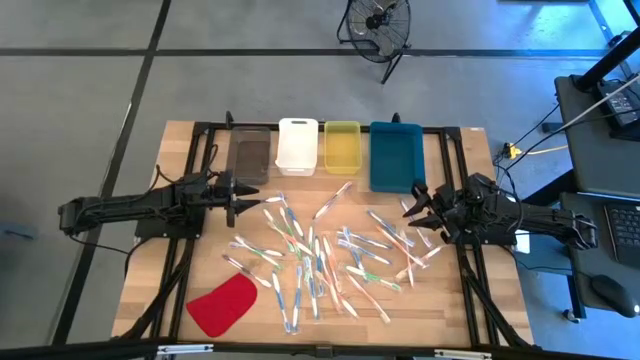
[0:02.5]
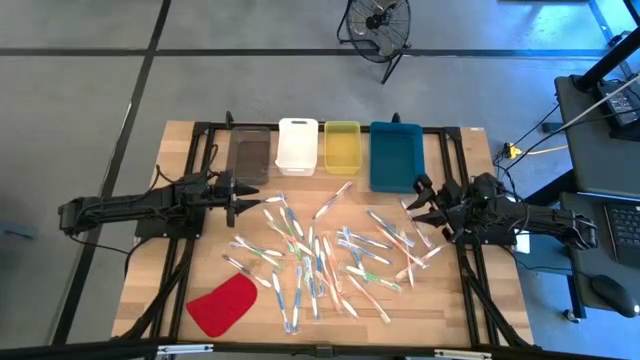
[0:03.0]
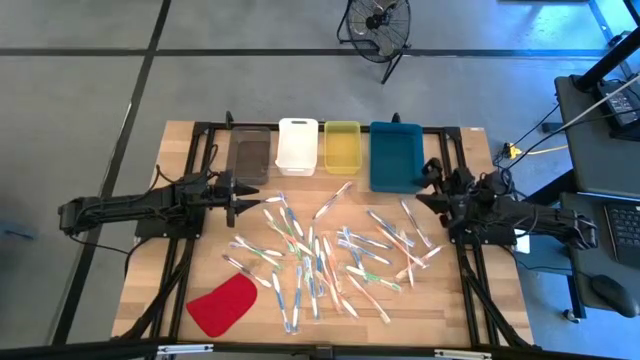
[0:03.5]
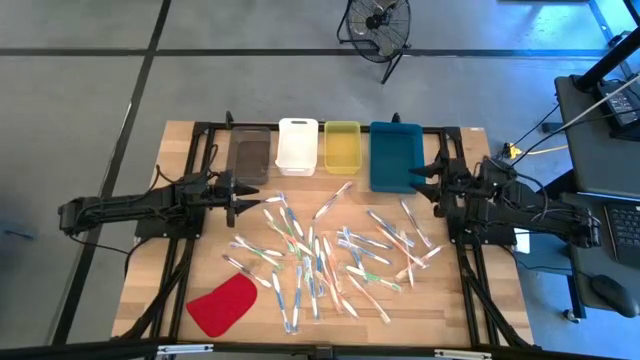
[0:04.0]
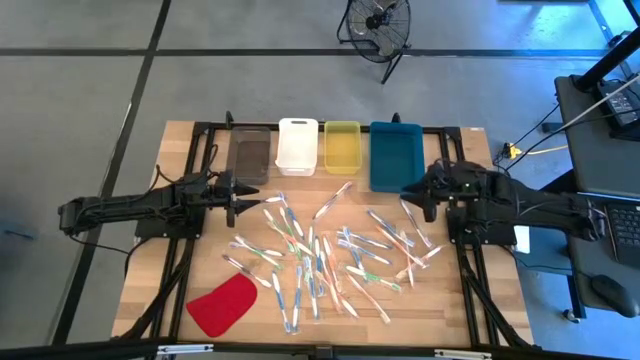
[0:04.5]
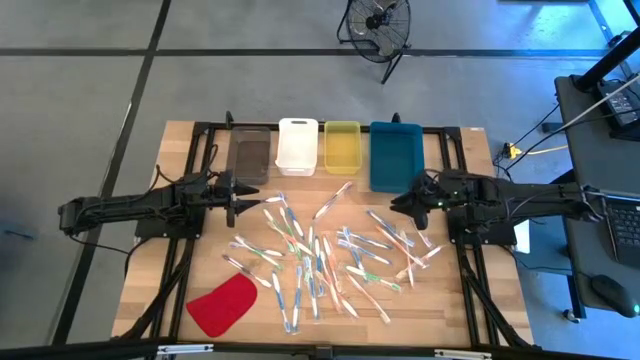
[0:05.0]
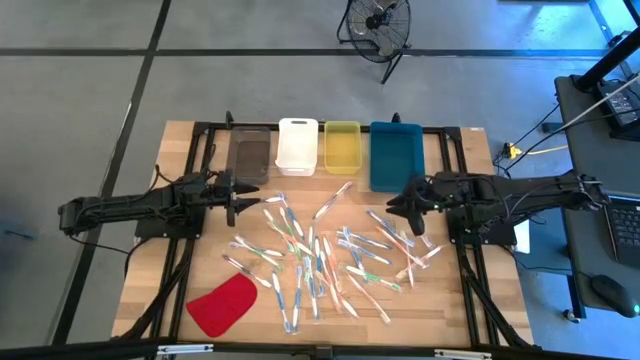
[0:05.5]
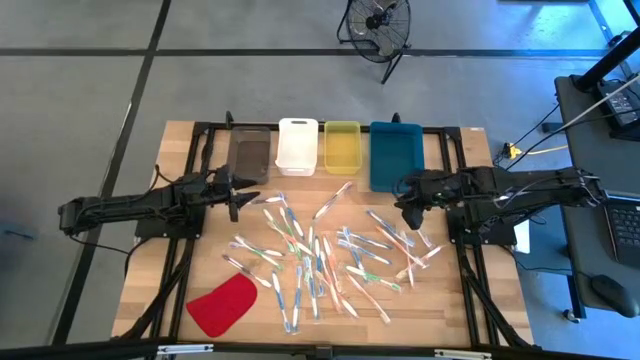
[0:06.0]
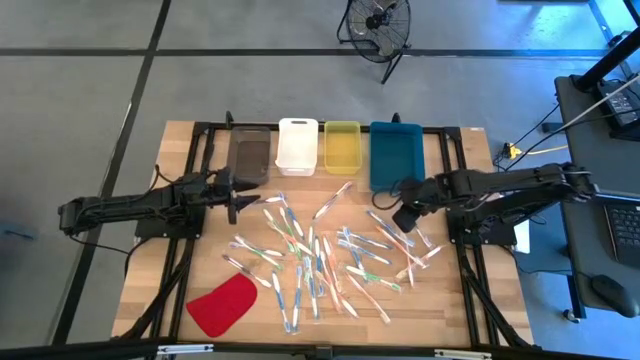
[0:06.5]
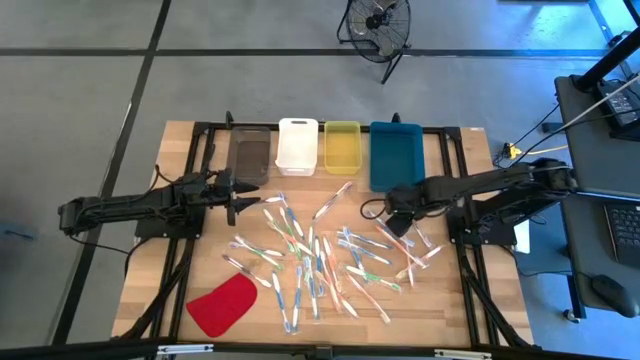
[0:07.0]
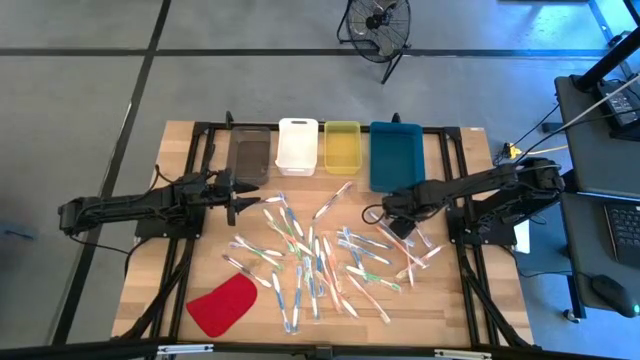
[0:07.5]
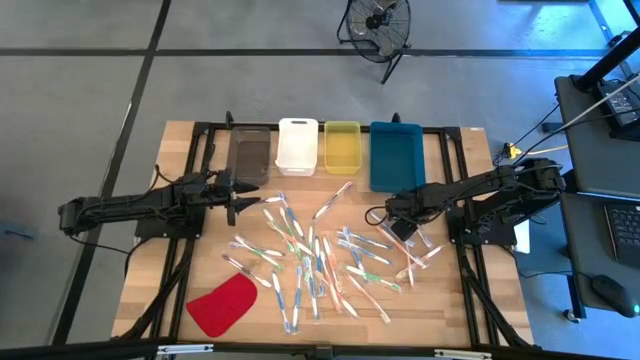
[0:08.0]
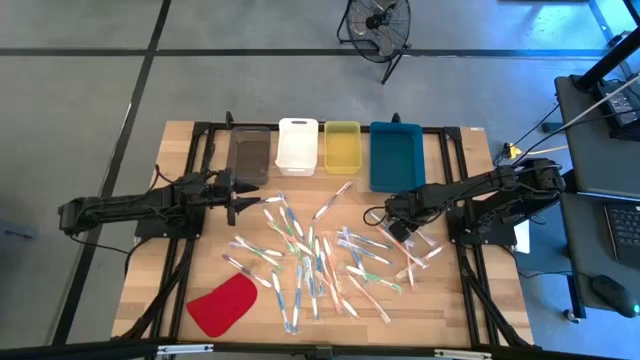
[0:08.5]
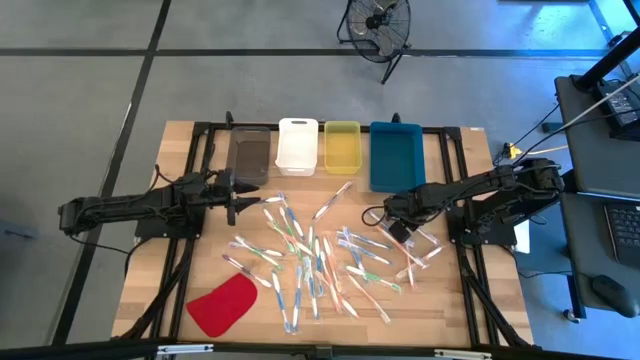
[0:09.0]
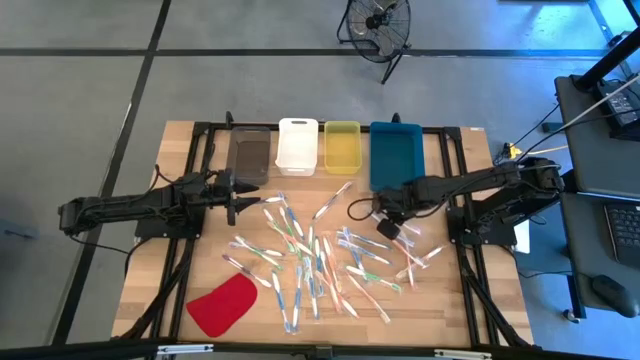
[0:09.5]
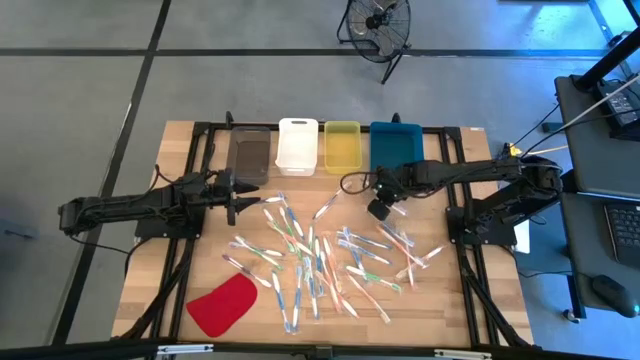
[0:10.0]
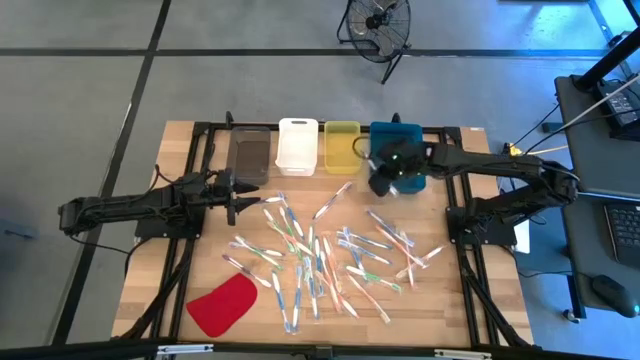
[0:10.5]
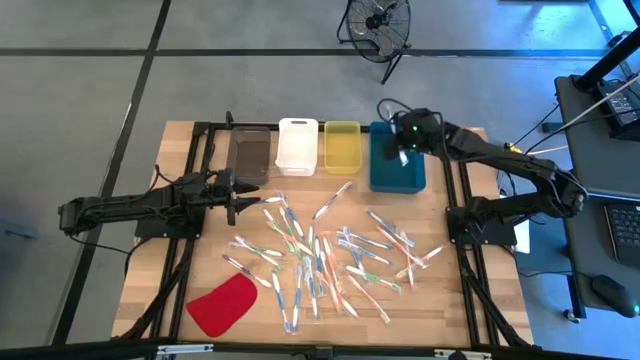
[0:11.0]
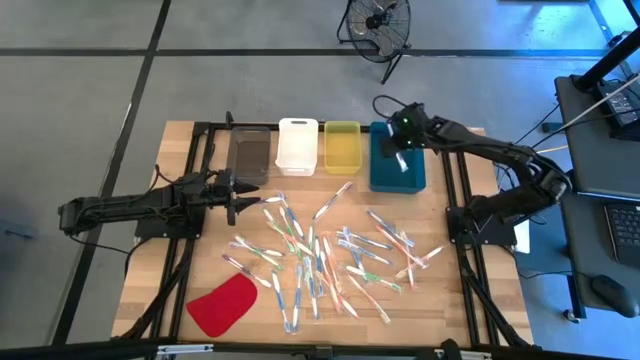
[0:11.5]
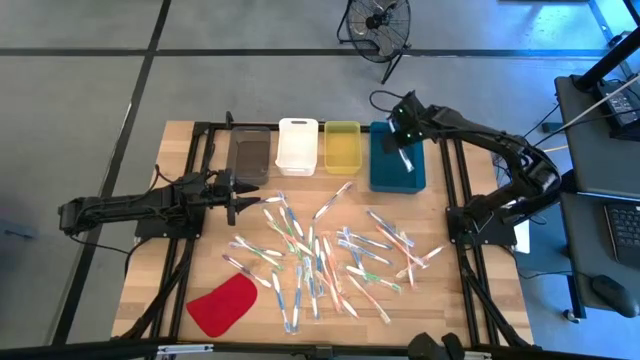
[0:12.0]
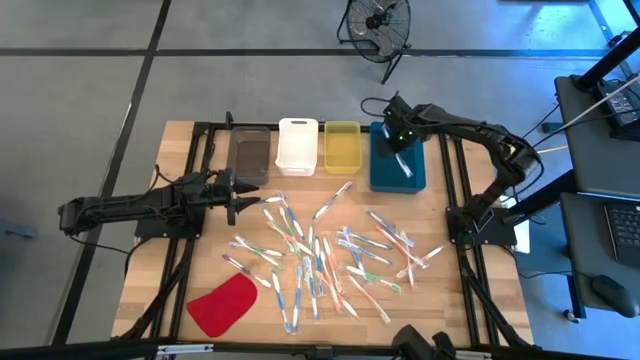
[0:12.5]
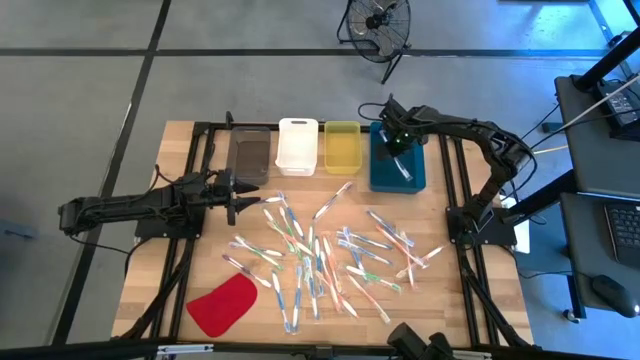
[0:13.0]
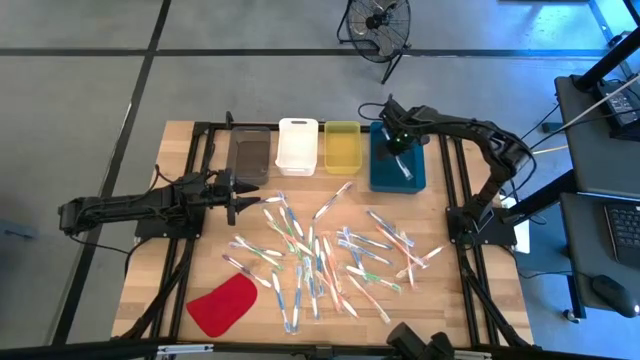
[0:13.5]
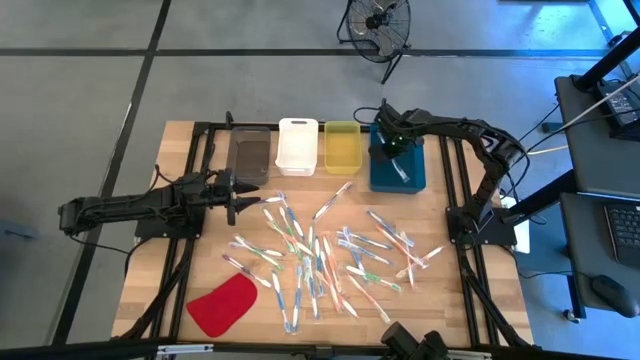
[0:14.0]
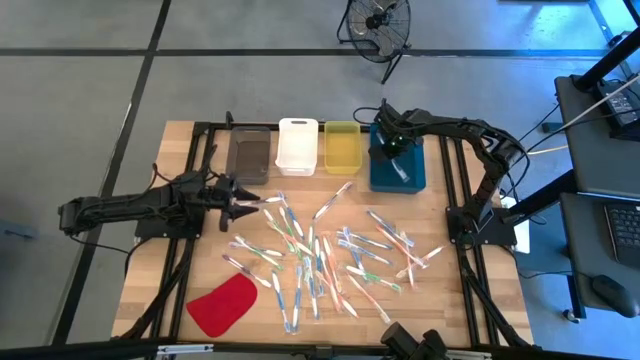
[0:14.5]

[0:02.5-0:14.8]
Task: Pick & Place Toothbrushes
Put the violet toothbrush into the blue bin

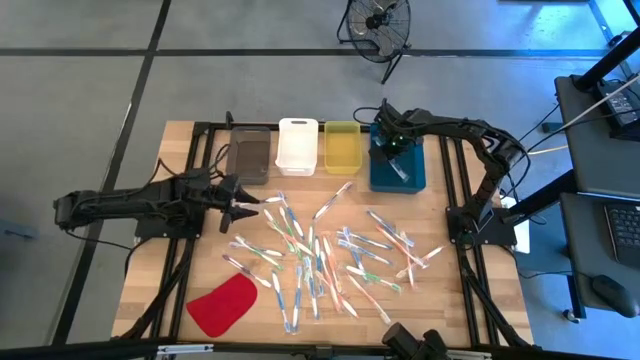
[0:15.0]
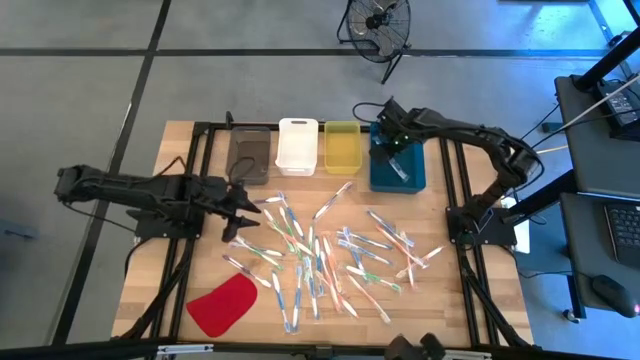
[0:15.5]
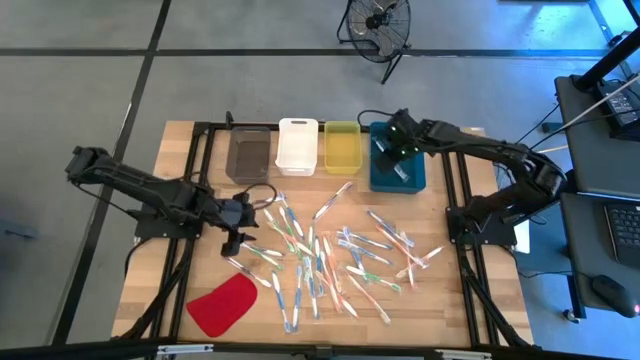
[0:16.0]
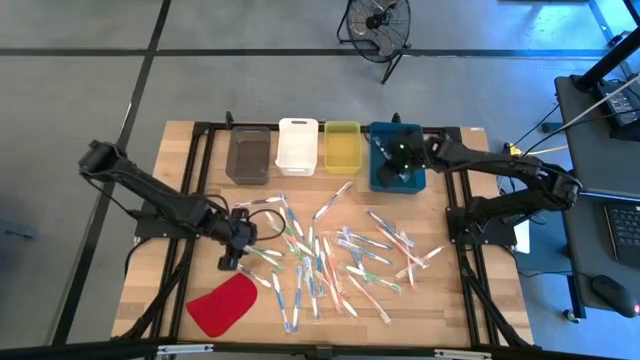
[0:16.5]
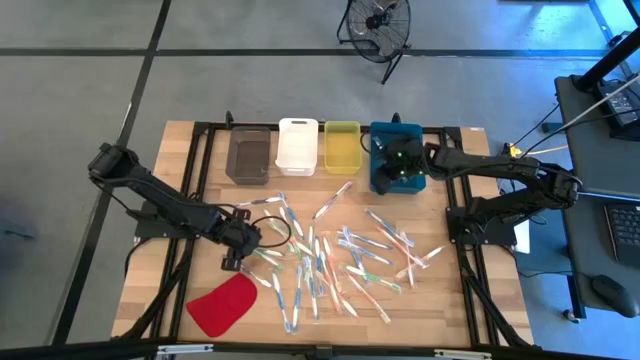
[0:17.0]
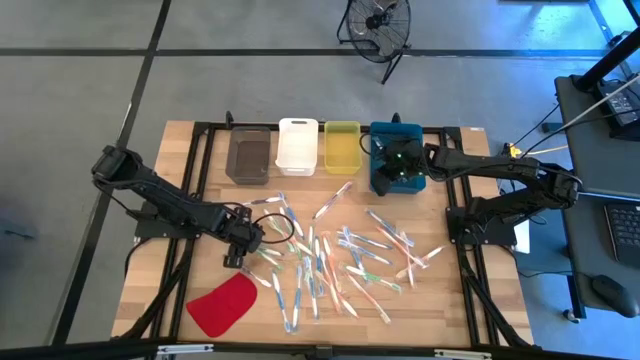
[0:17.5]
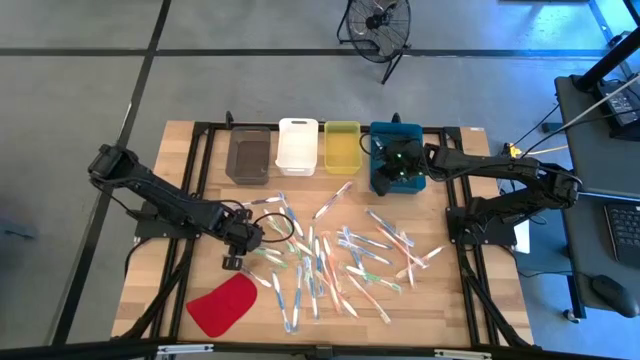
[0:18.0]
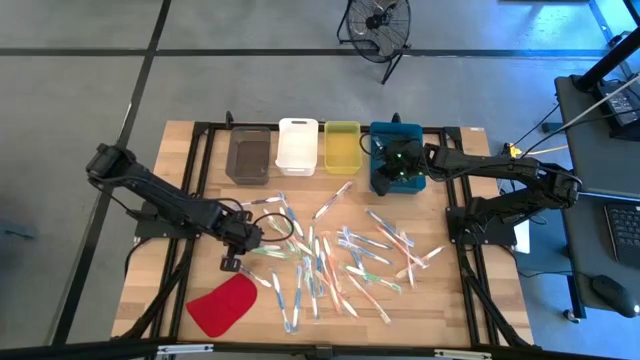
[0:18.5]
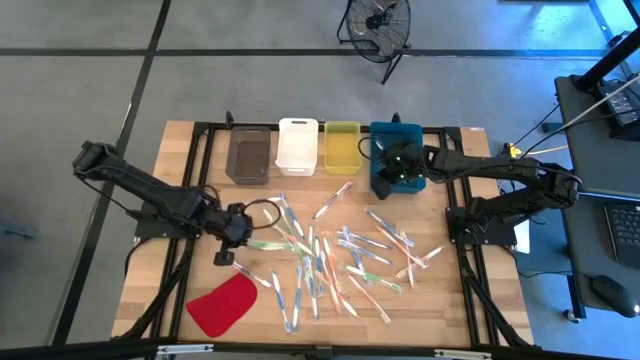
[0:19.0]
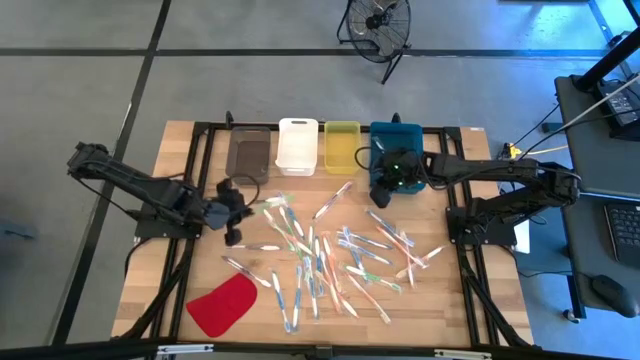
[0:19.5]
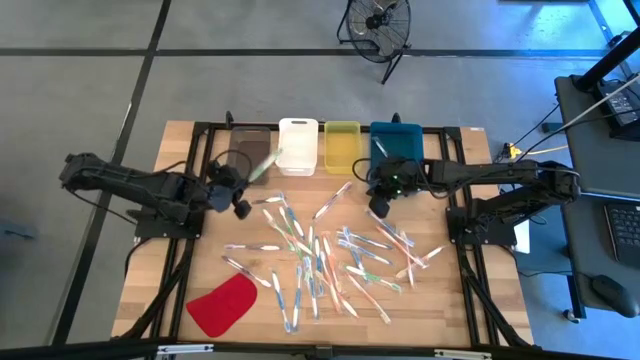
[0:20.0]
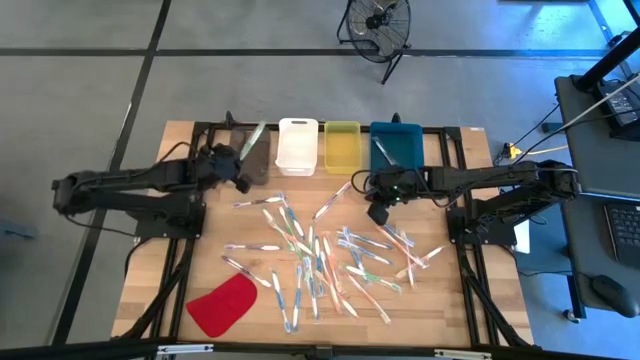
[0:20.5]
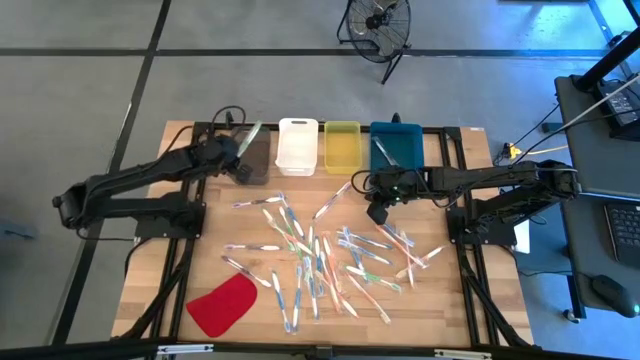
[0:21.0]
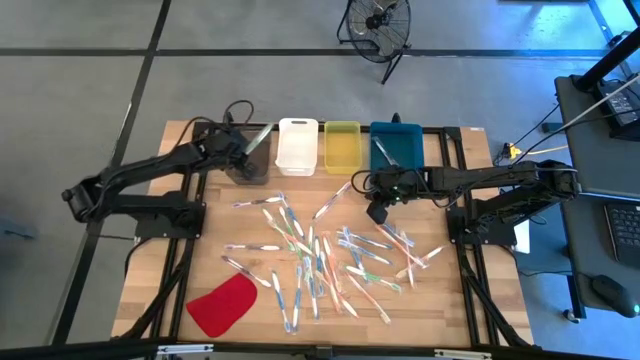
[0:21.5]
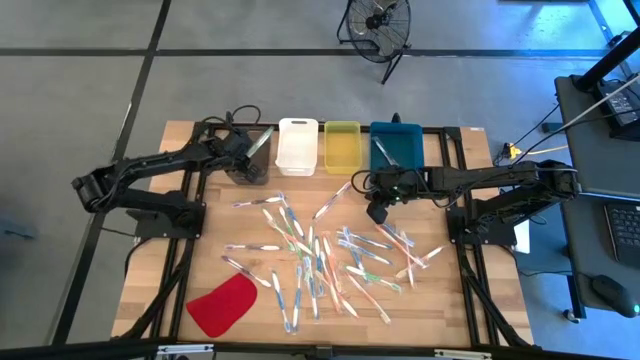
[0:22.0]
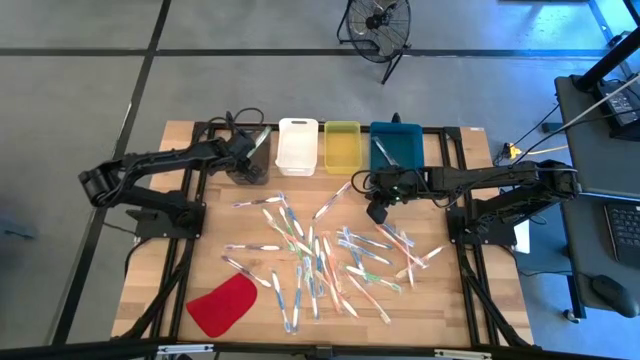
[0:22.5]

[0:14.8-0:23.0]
Put the green toothbrush into the black bin

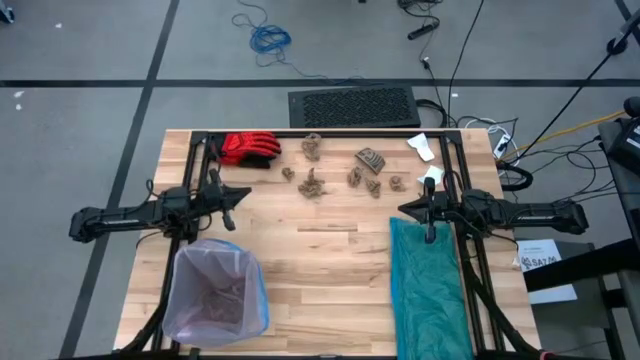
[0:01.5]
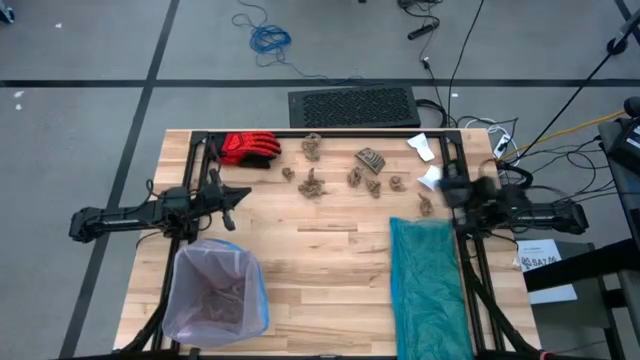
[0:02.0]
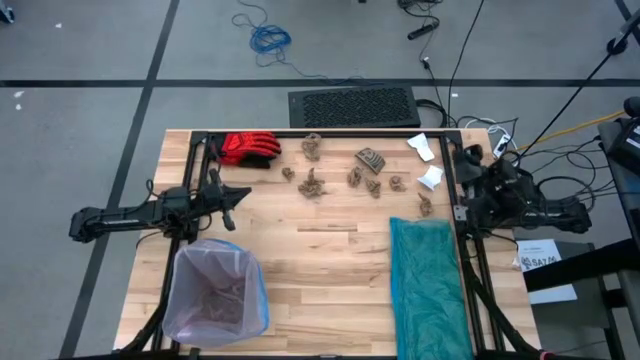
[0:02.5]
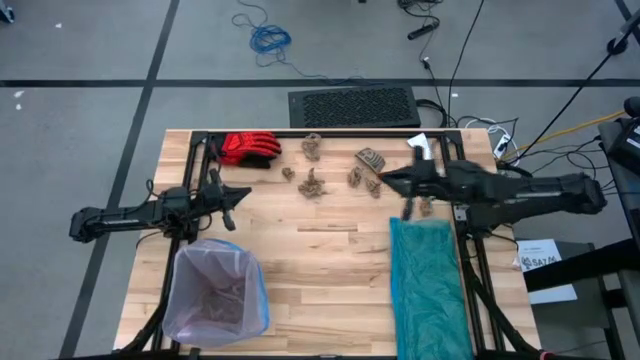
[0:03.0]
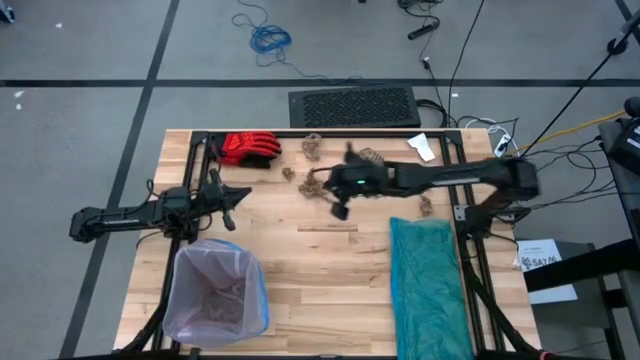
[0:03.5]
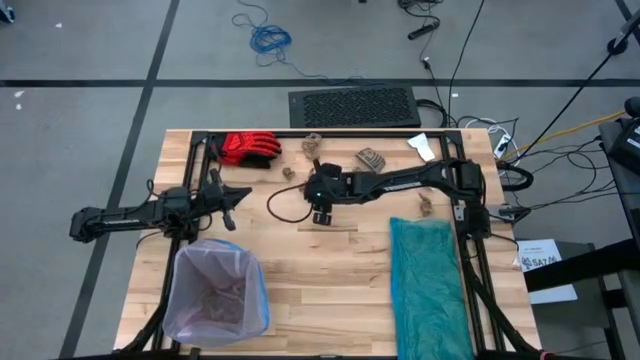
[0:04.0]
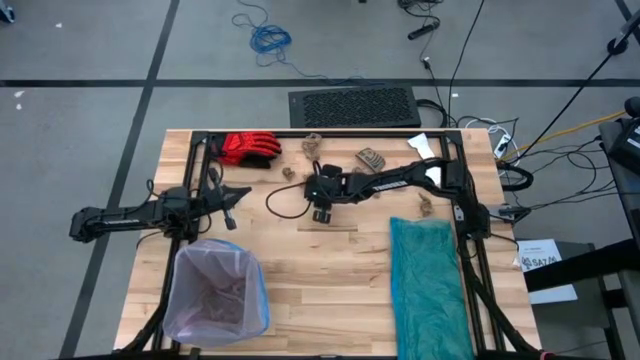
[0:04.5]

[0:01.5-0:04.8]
Task: place trash/remove bag and relplace
Put the brown napkin into the trash bin
